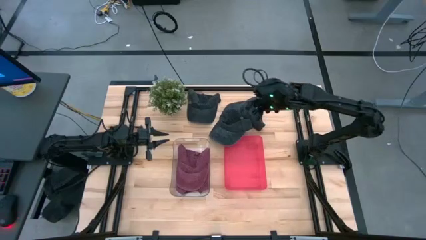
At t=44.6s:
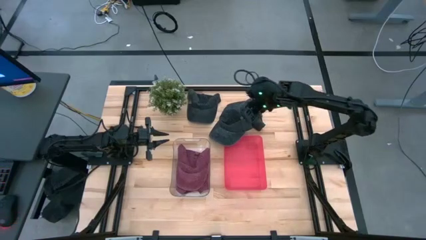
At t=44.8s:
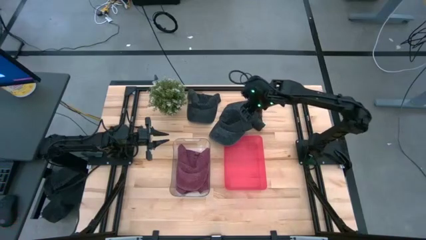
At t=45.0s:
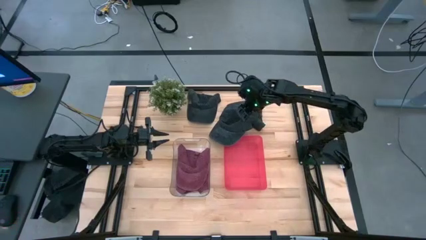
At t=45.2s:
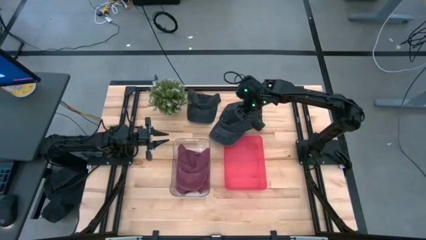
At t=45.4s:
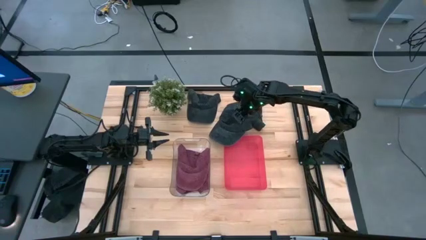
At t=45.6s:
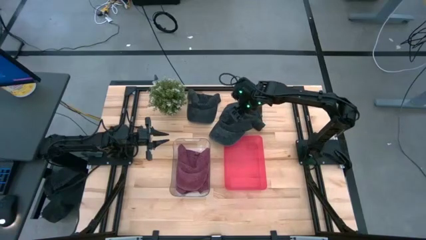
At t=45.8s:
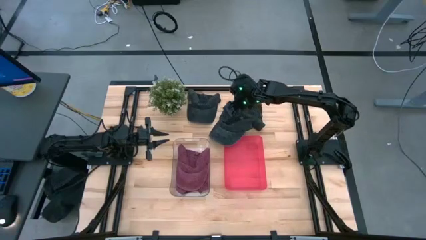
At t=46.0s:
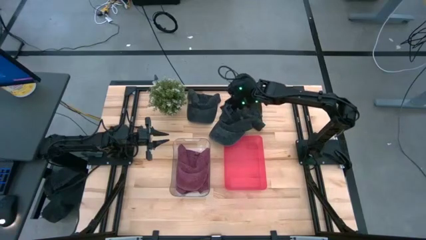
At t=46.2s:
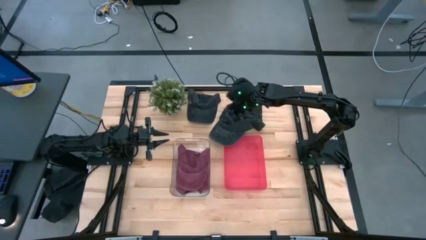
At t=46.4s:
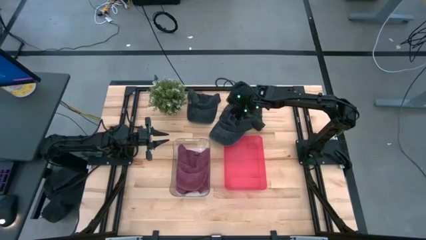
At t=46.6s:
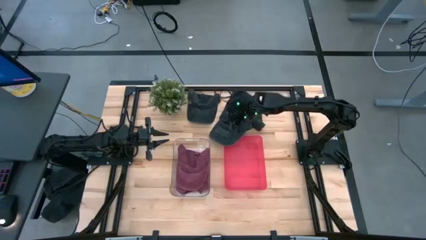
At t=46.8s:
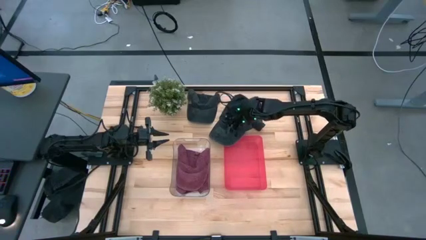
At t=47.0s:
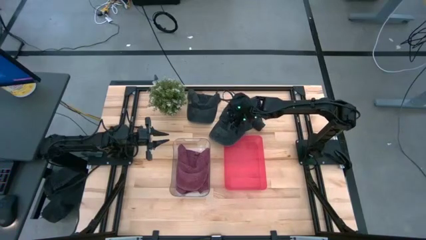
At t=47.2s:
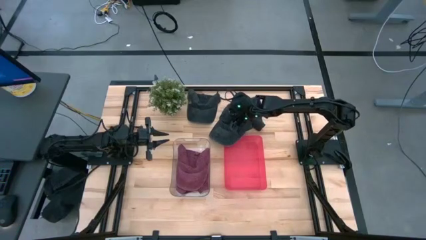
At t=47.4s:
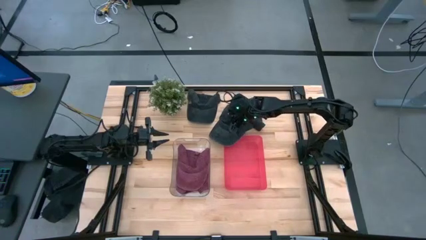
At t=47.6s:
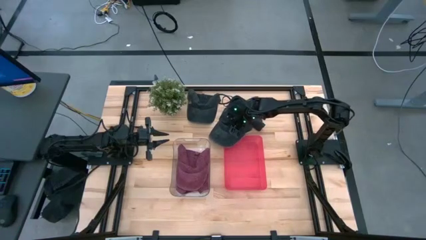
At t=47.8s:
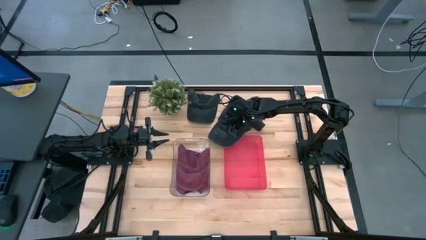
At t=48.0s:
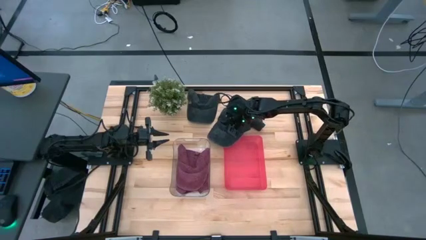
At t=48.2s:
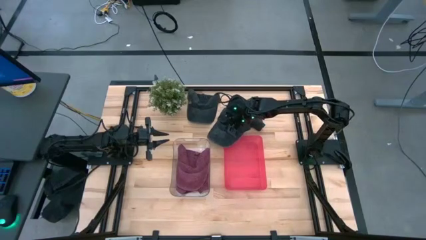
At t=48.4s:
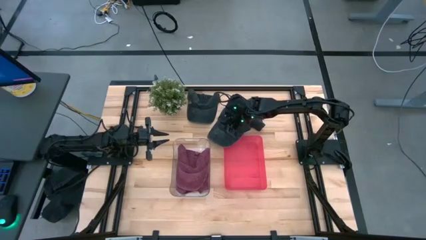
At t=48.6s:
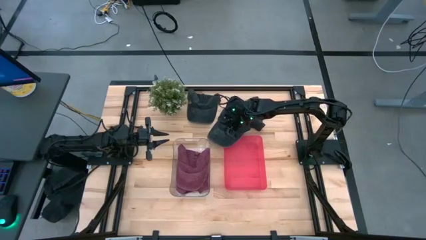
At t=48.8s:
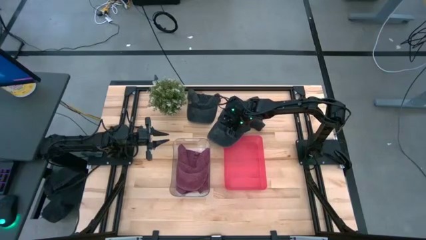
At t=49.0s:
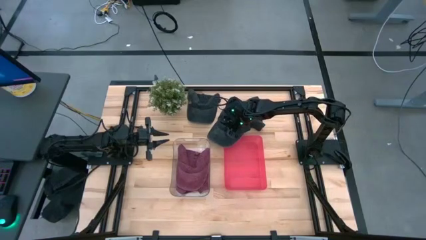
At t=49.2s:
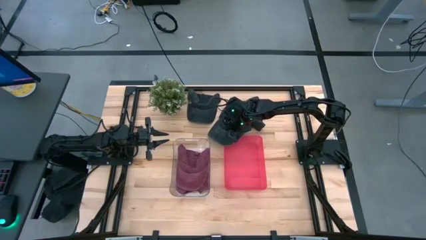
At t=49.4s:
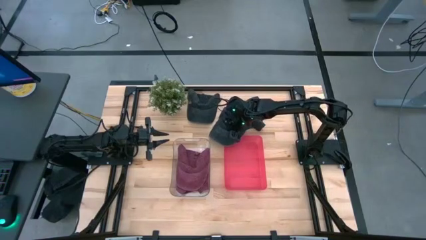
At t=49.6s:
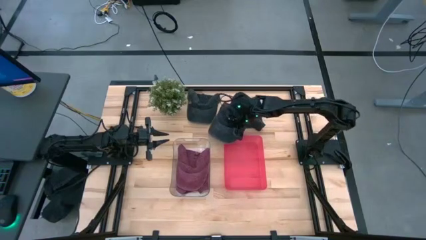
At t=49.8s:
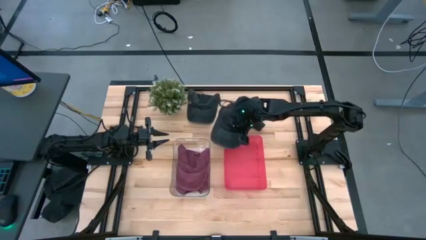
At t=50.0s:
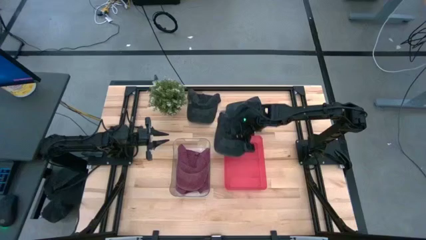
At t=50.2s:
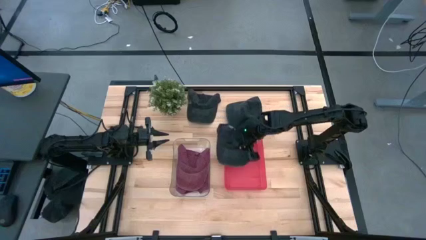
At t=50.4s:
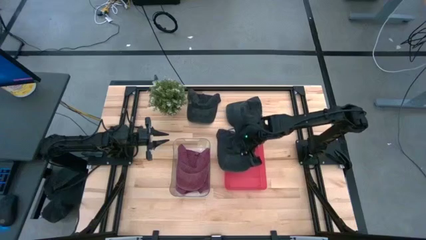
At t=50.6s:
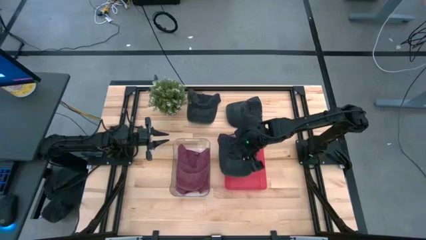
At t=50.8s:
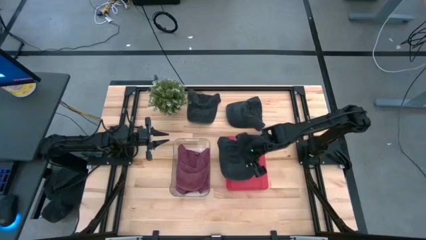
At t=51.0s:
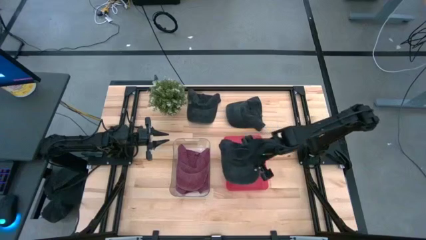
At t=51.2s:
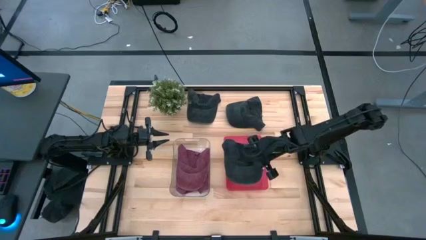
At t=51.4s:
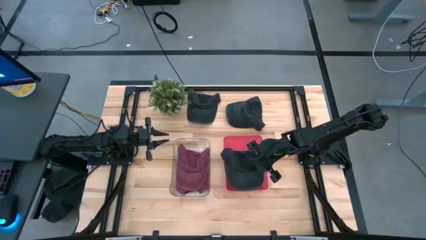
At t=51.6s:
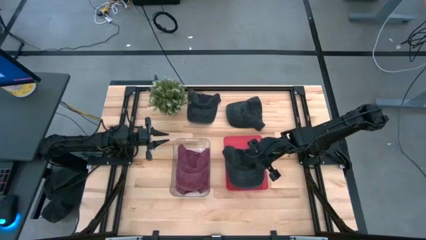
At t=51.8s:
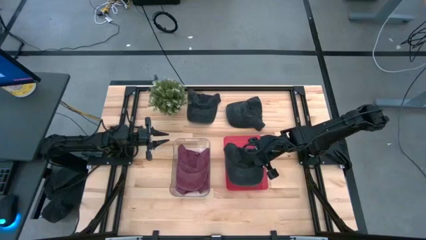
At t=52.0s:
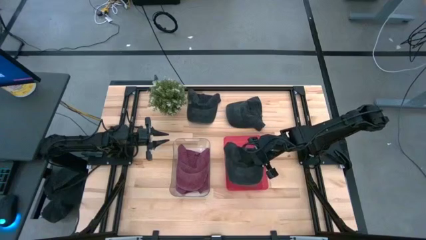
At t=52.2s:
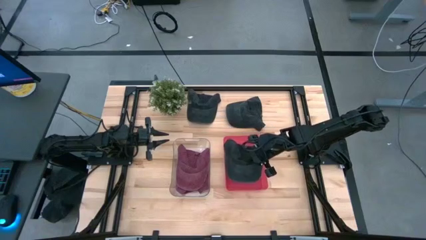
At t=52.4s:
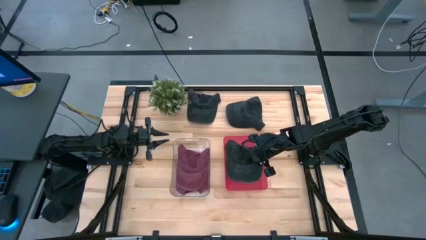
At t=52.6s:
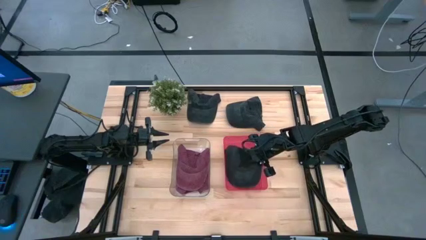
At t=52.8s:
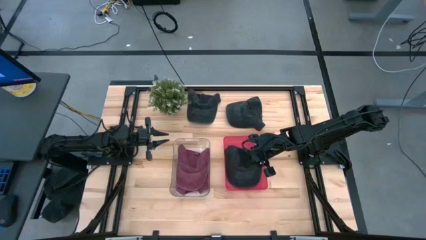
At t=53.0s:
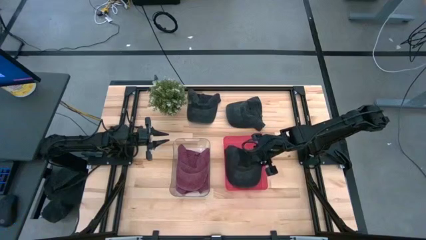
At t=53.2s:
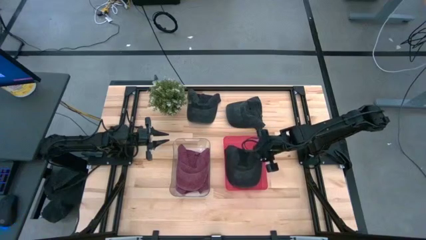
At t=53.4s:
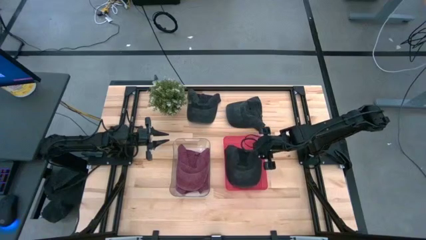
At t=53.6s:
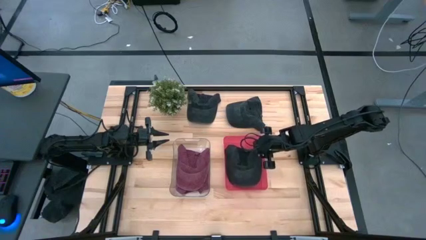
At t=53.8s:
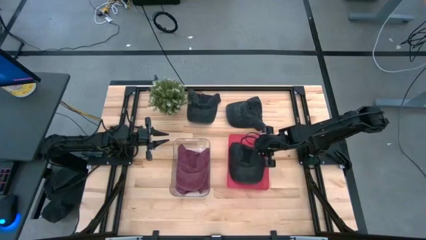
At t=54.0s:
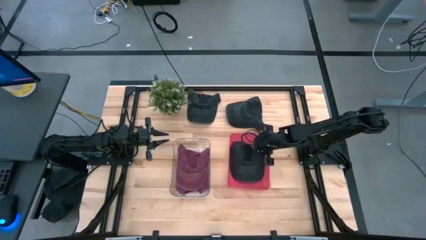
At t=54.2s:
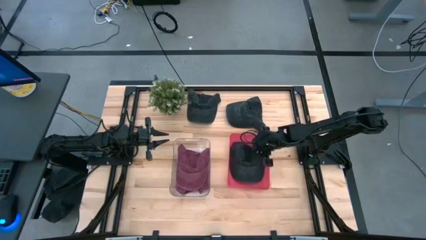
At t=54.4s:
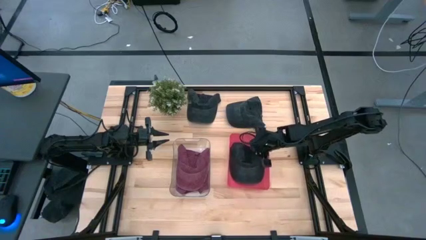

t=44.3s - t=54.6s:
Task: Pick & Place hat
Put the black cap into the red bin

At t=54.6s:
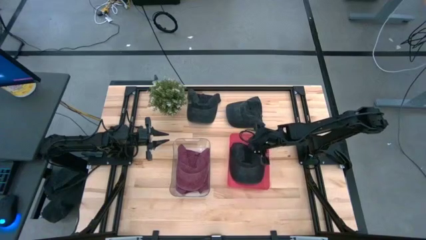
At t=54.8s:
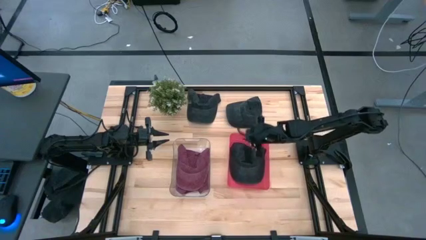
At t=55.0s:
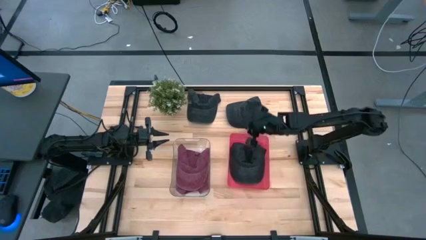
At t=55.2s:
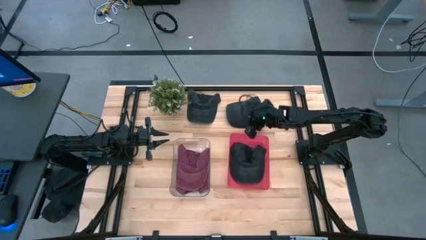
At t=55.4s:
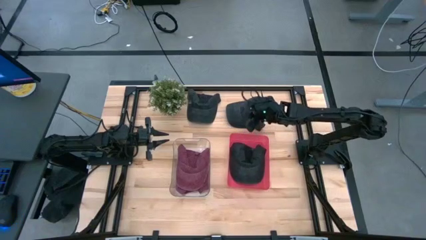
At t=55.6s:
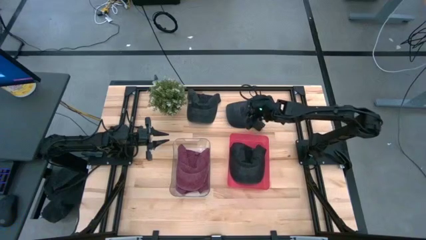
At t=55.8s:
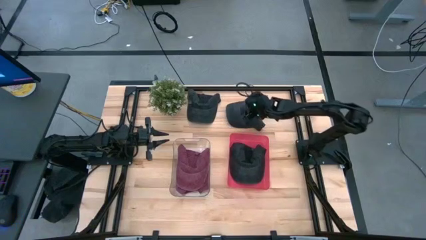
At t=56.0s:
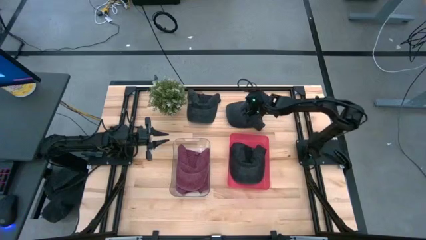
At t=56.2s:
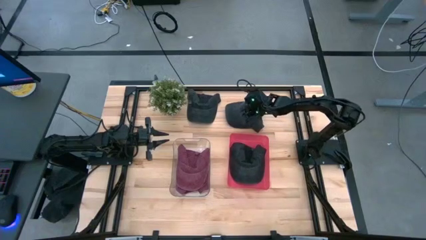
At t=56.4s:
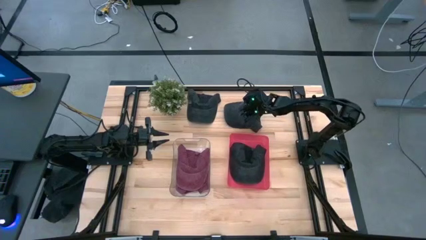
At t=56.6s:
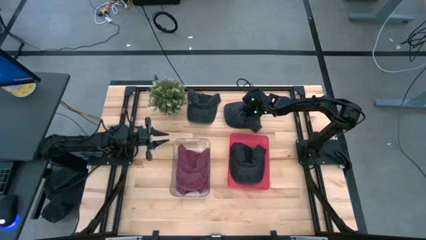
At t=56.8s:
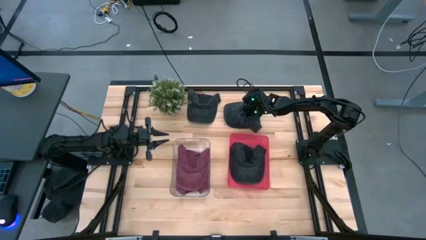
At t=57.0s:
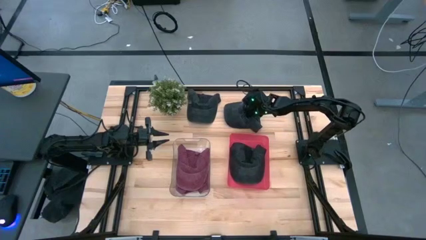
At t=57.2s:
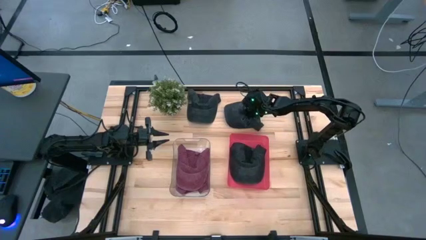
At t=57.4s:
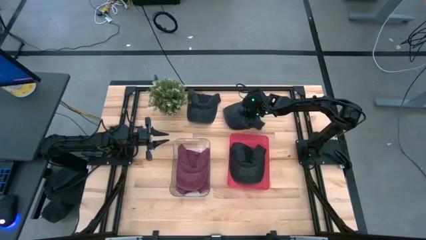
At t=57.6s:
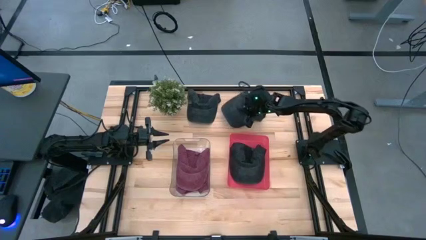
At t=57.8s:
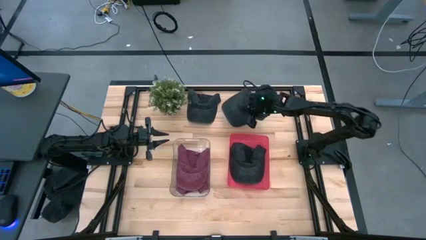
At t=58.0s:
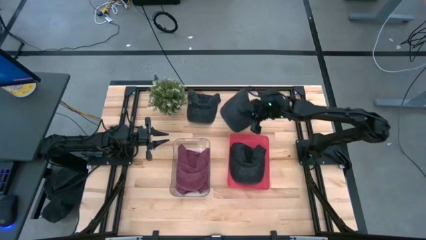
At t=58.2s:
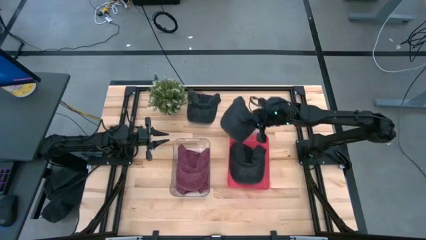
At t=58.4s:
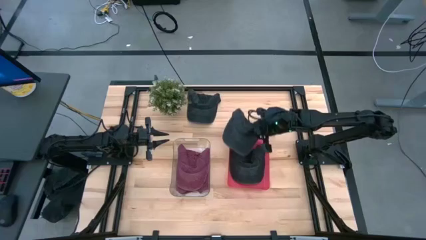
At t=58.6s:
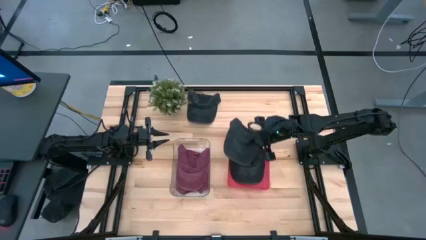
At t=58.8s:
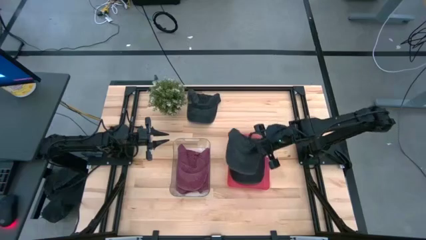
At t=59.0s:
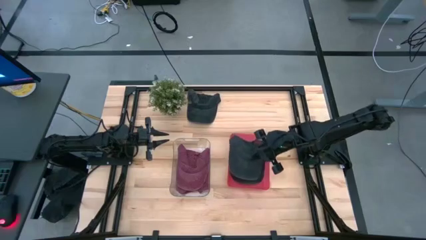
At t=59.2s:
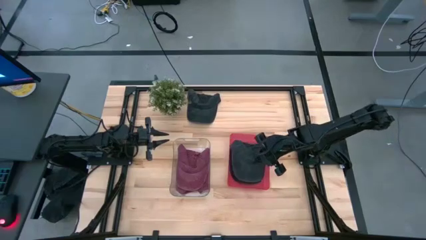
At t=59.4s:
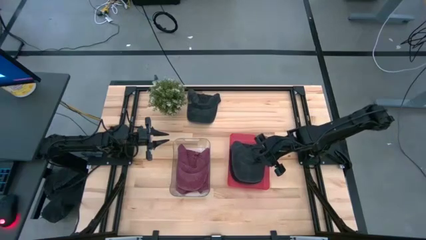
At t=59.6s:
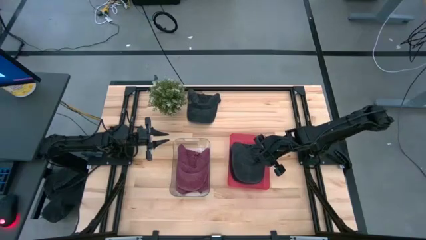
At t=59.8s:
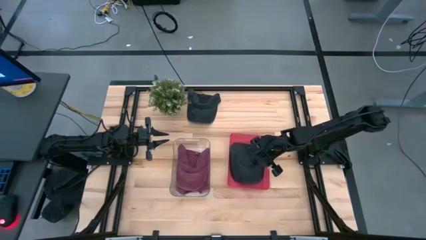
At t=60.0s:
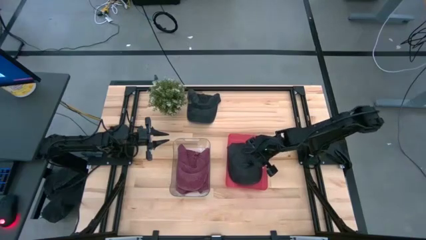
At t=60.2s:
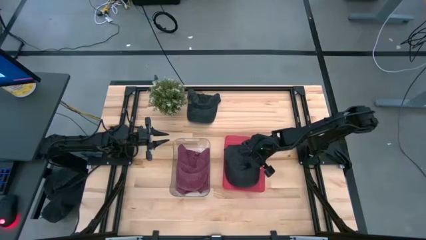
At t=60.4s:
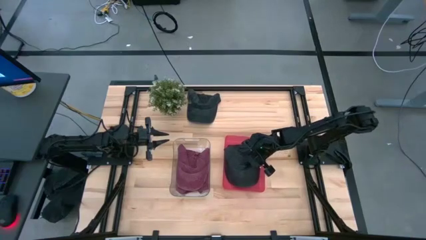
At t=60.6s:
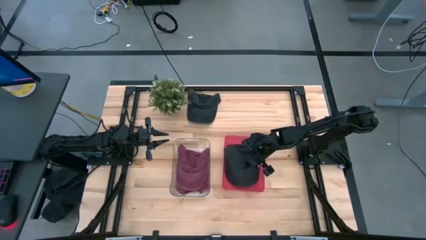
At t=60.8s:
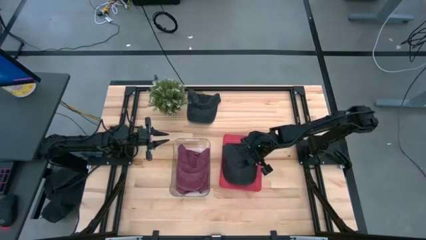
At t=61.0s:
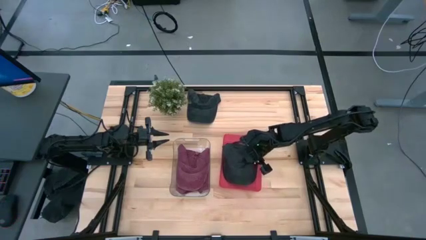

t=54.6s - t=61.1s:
Put the right black cap into the red bin
